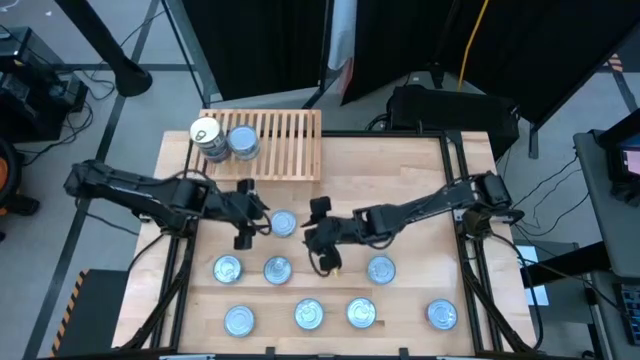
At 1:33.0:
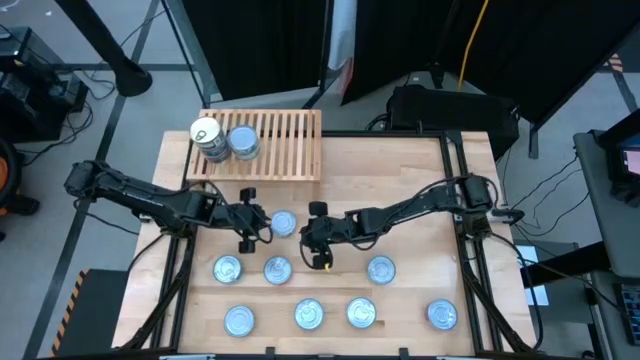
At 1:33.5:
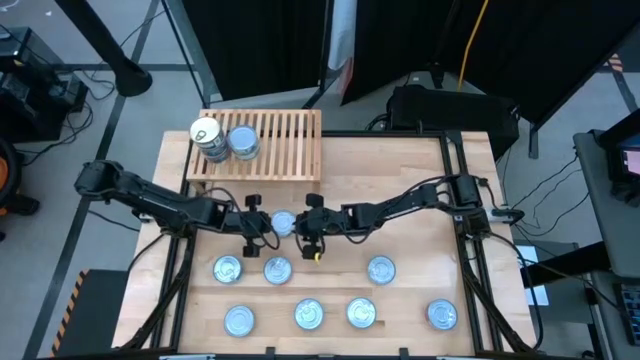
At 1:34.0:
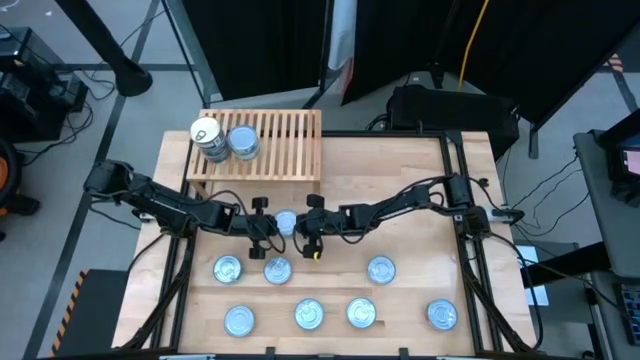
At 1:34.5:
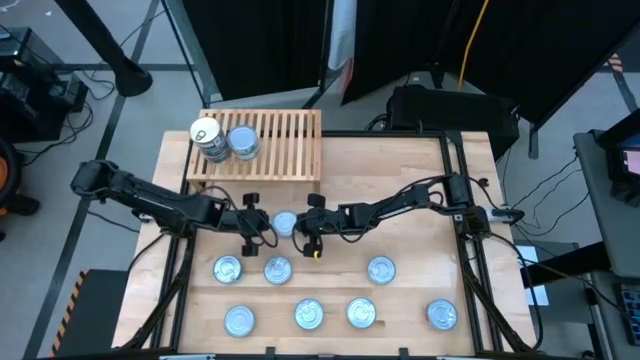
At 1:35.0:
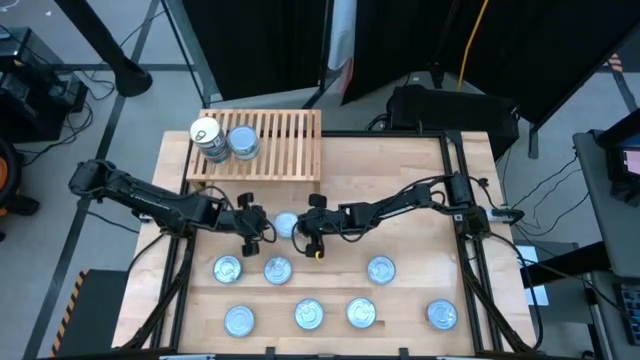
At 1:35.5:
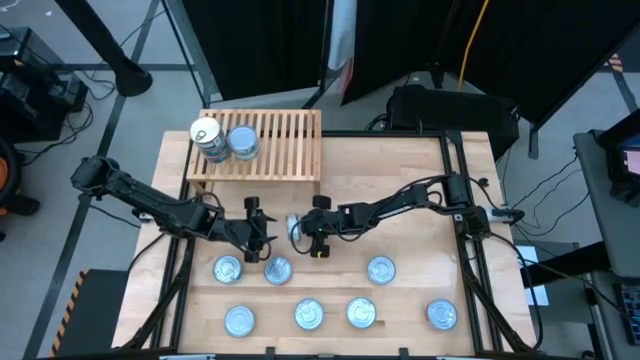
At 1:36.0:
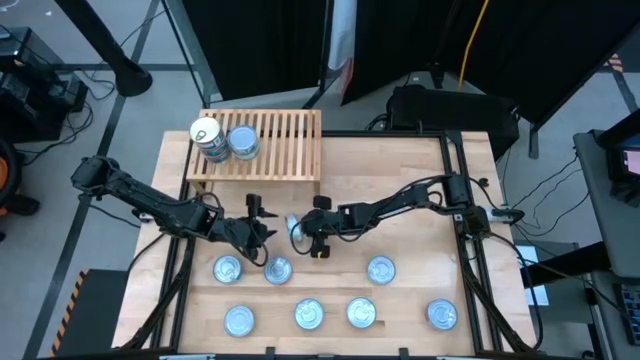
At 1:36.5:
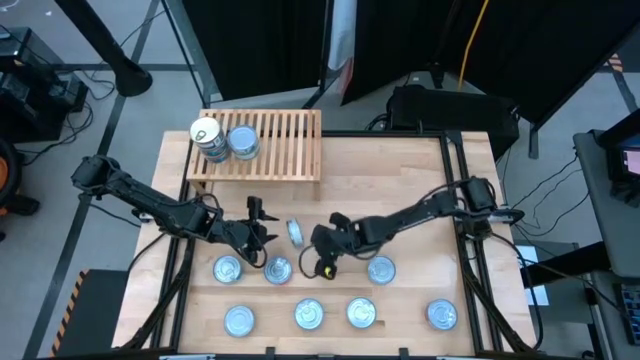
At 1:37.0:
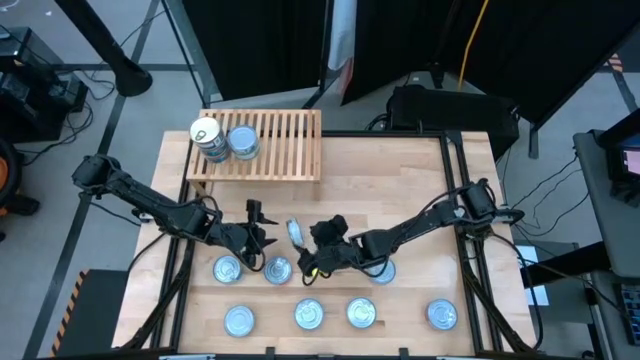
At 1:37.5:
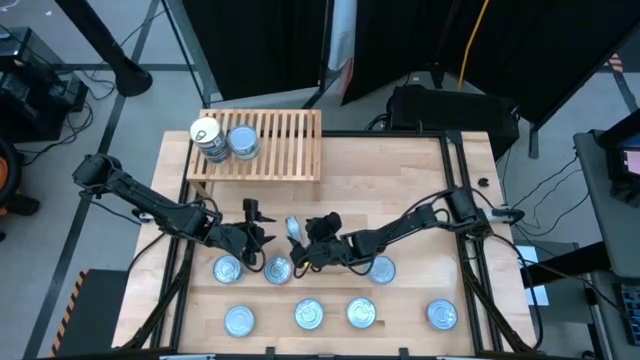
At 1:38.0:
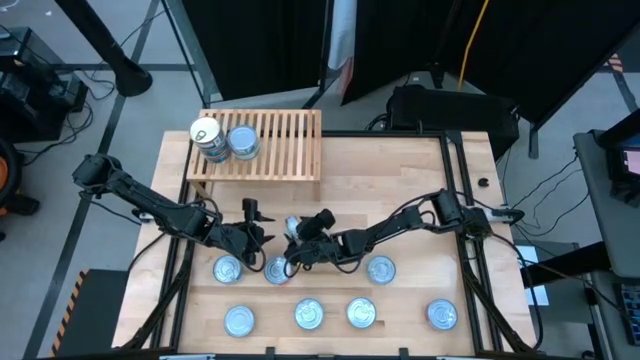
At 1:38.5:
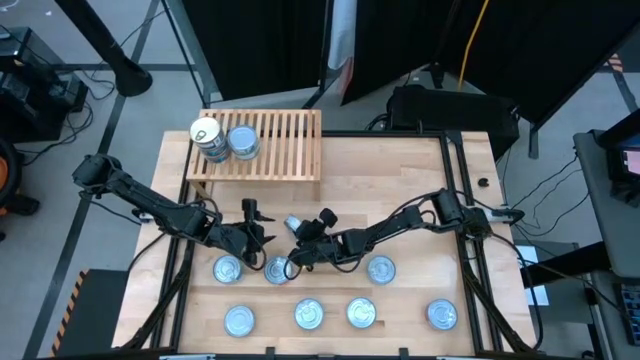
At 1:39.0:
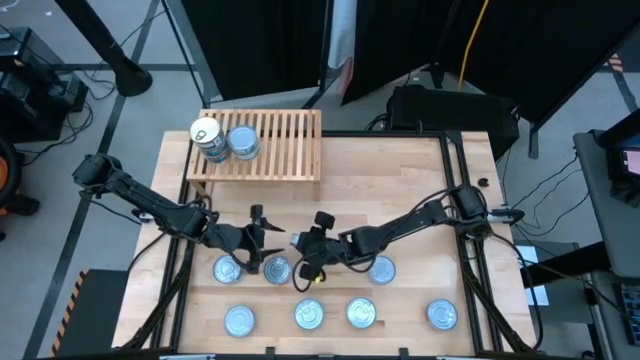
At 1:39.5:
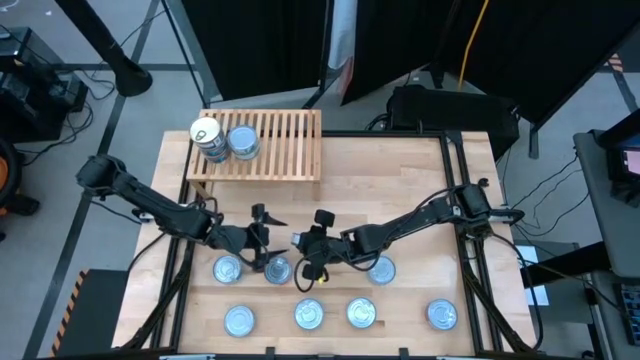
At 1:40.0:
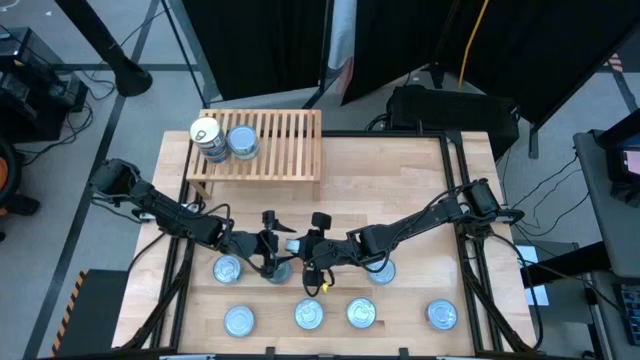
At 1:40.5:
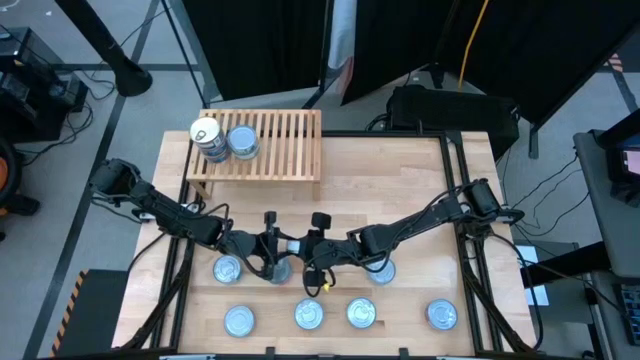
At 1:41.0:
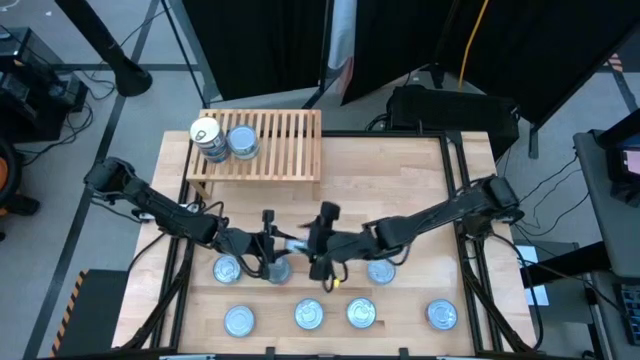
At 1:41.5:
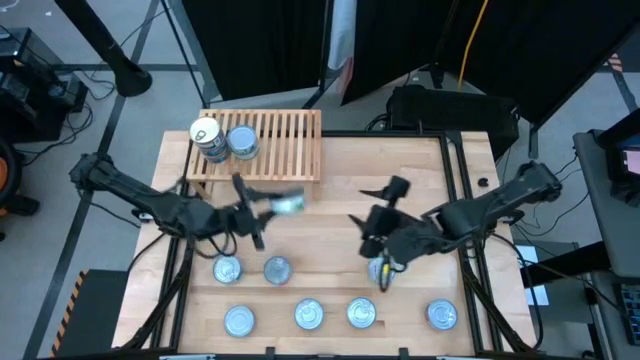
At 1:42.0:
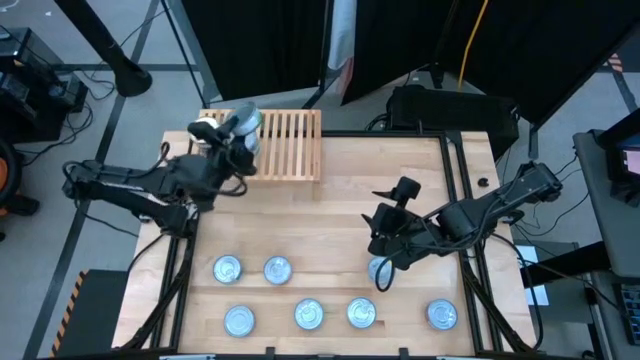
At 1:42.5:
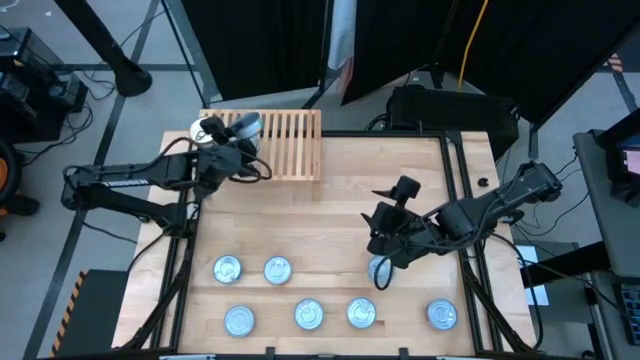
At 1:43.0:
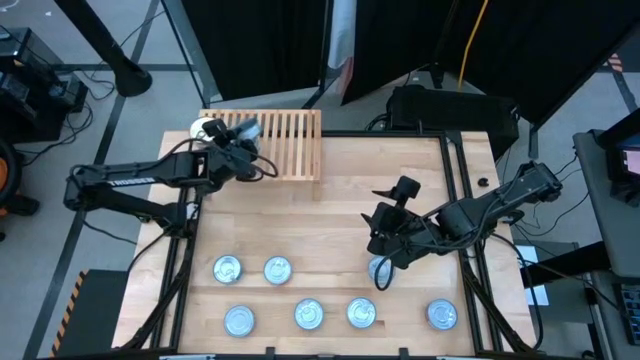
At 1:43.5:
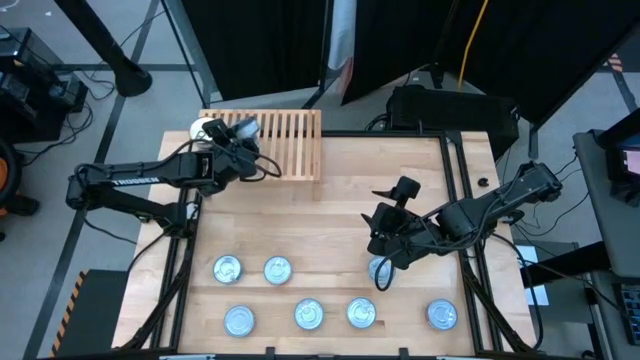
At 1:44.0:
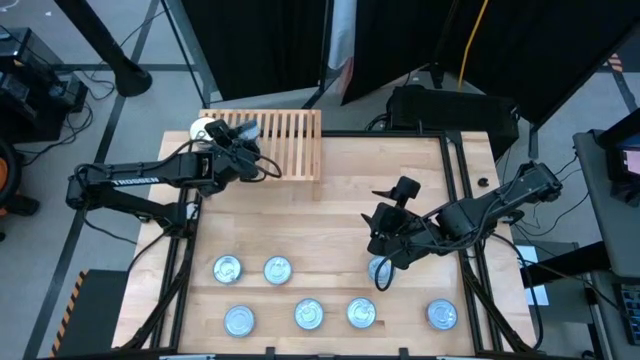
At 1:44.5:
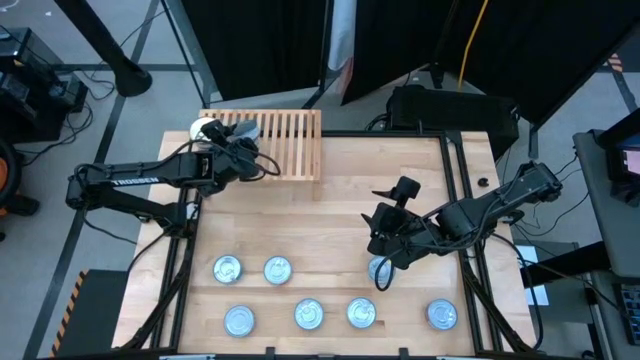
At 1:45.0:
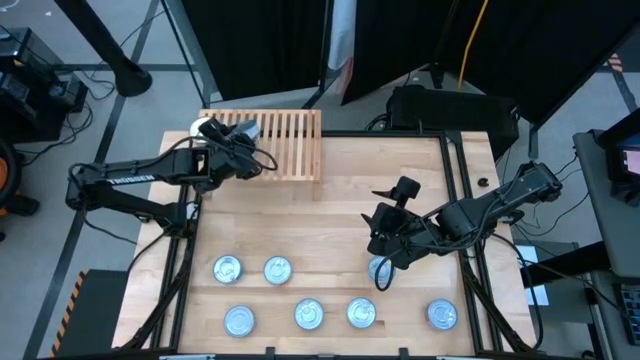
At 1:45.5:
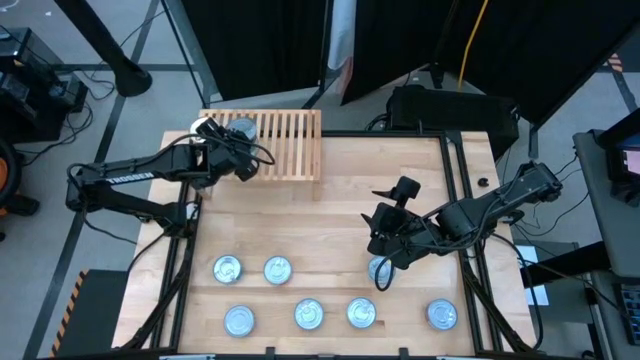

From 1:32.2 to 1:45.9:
Task: Stack canned seafood by type on shelf
Stack the green can on top of the other green can

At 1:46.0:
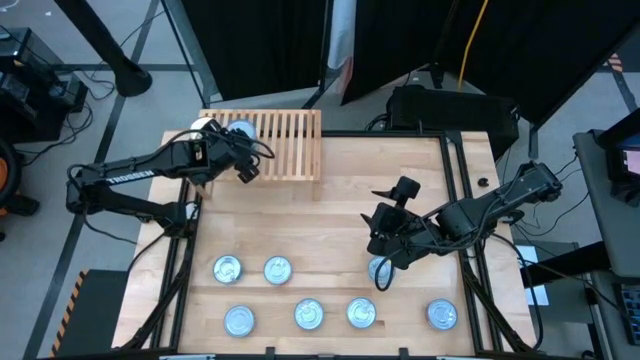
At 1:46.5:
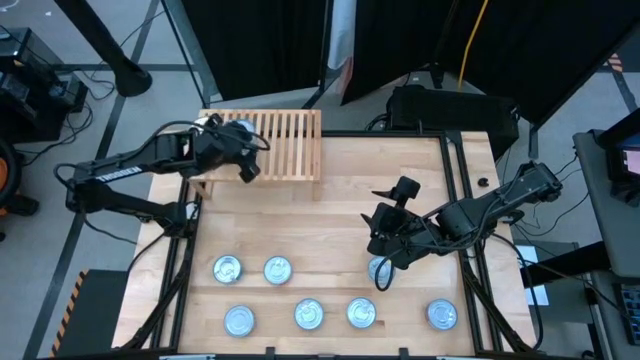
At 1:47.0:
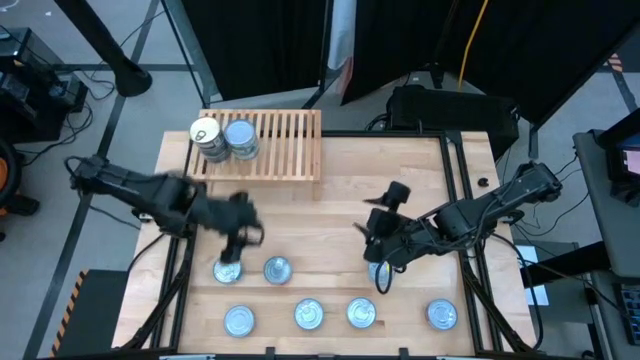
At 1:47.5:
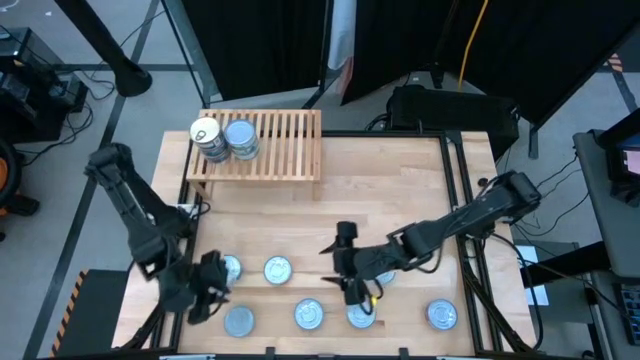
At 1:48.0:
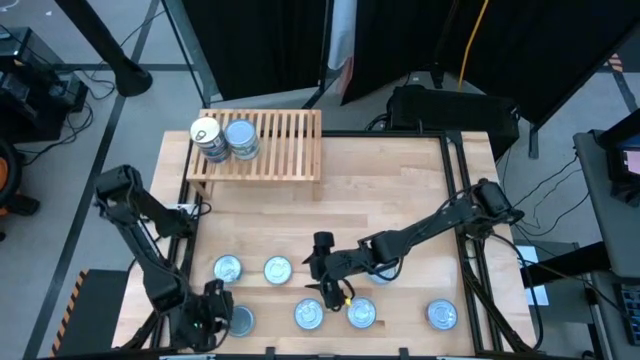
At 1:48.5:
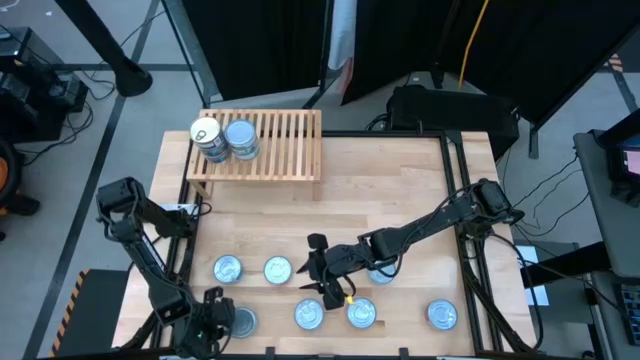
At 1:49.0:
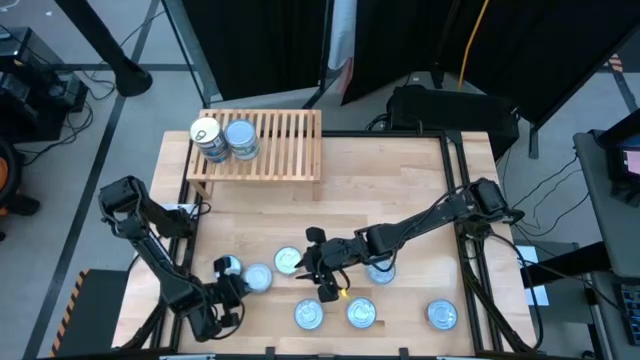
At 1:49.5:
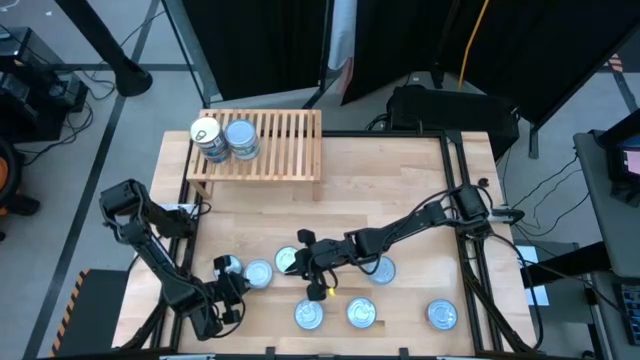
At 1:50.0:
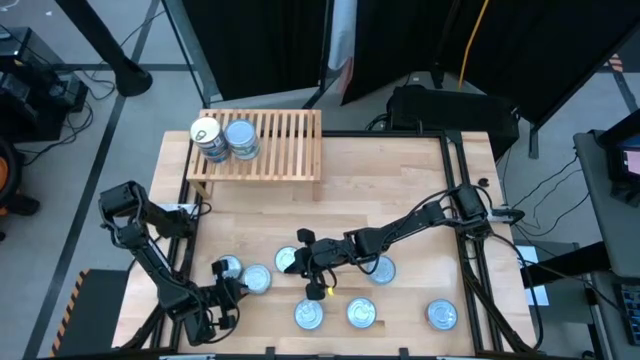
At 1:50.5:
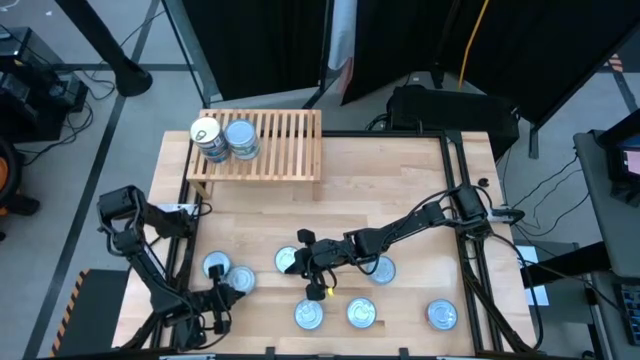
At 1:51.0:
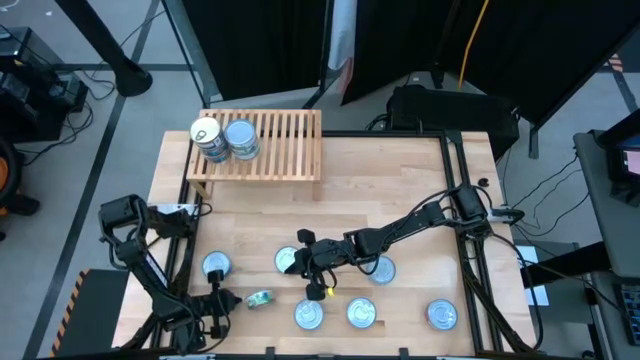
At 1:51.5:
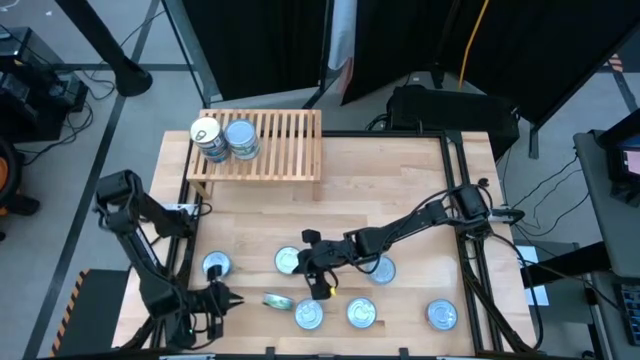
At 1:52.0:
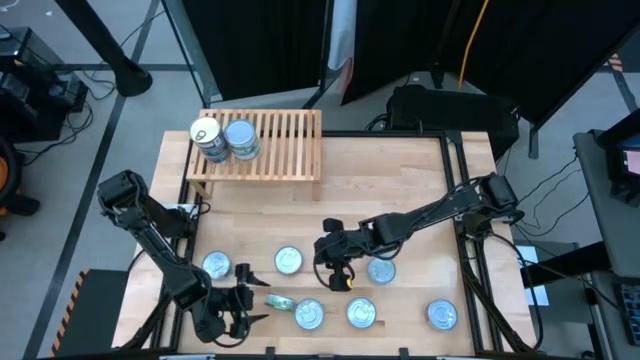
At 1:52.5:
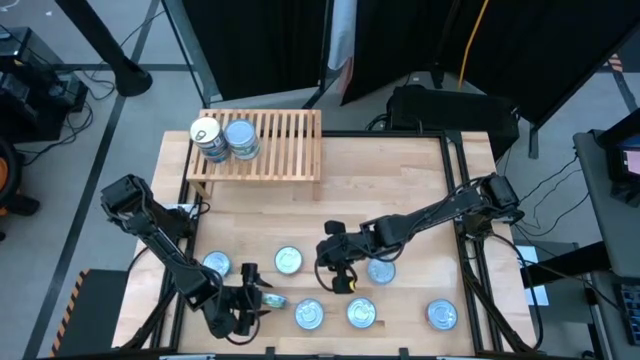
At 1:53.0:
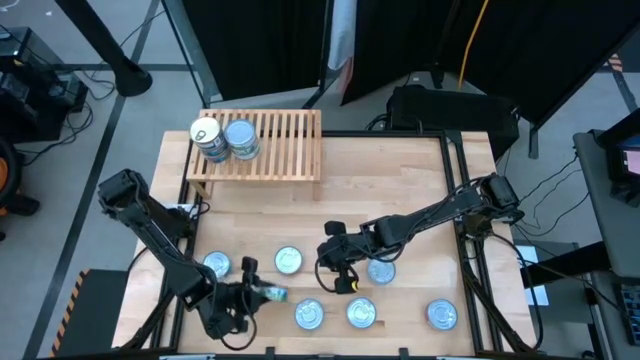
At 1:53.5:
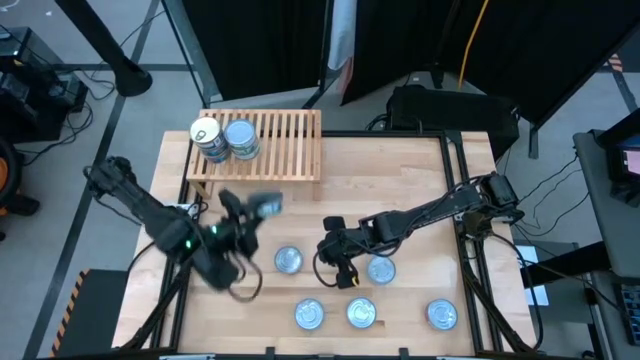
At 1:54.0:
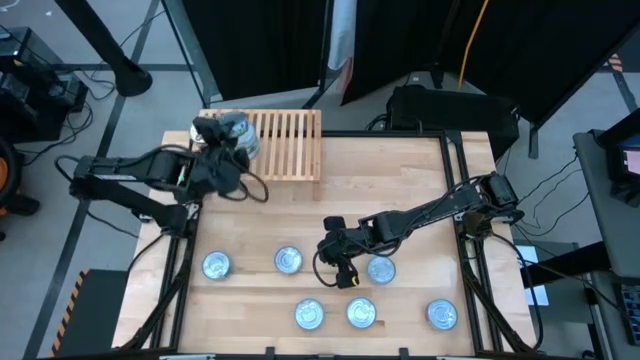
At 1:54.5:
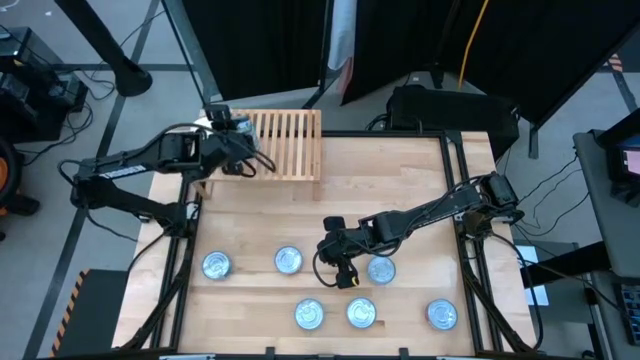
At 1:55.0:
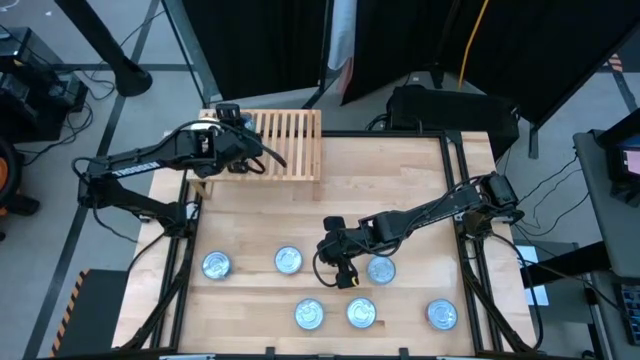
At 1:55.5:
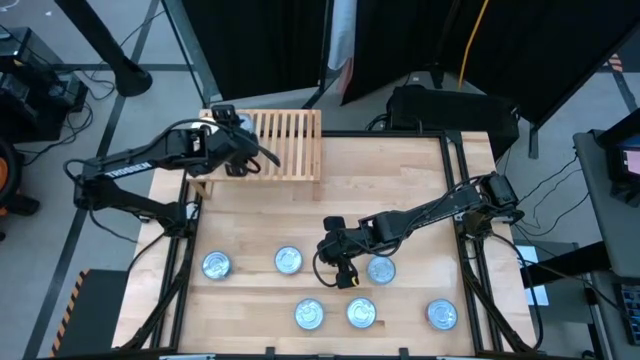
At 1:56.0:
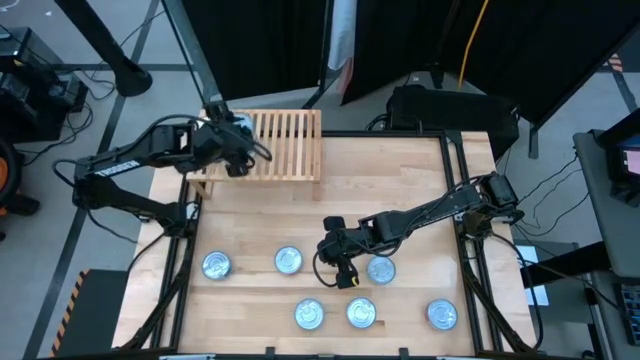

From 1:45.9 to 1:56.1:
Stack the green can on top of the other green can
